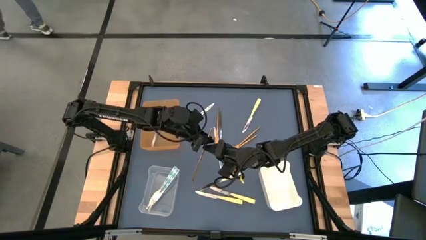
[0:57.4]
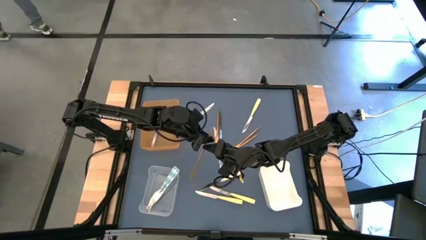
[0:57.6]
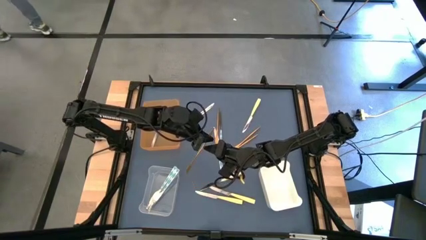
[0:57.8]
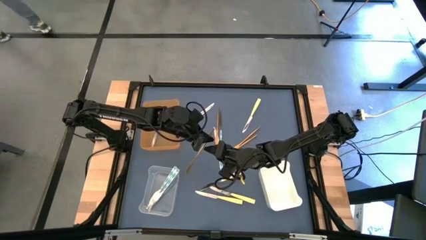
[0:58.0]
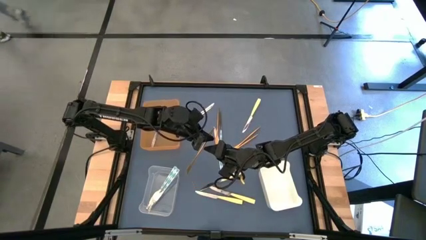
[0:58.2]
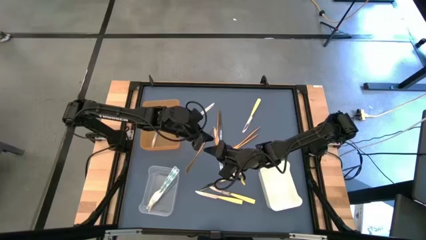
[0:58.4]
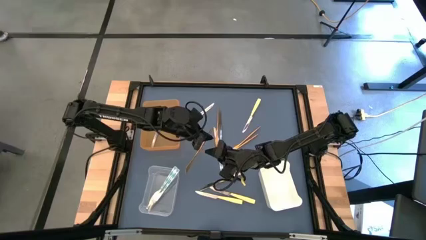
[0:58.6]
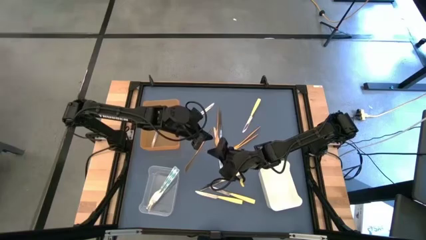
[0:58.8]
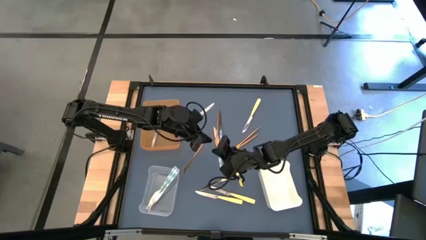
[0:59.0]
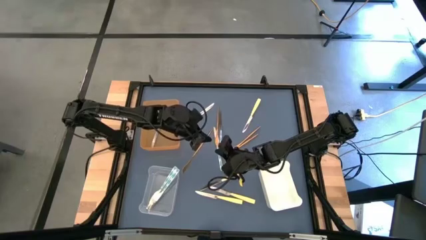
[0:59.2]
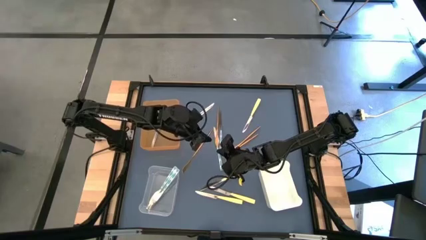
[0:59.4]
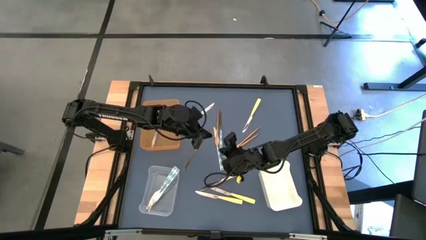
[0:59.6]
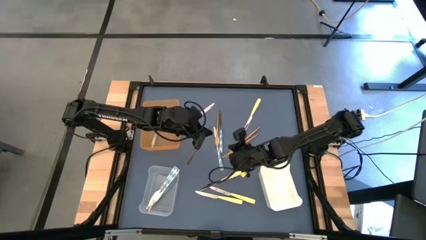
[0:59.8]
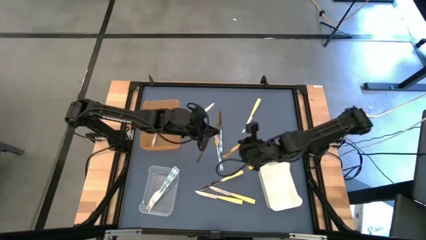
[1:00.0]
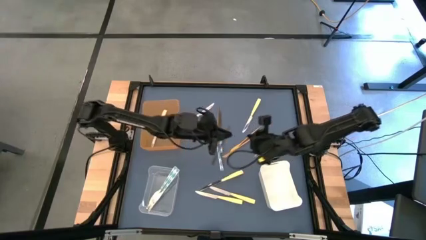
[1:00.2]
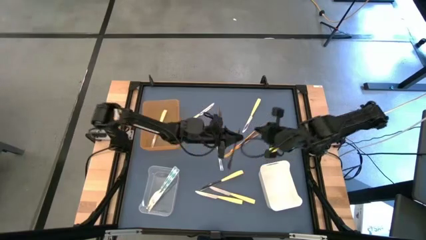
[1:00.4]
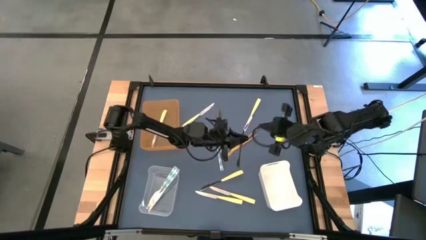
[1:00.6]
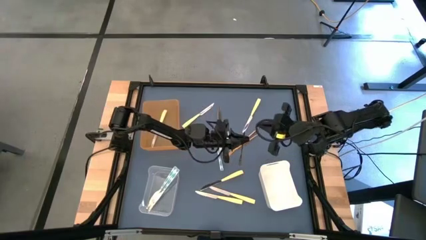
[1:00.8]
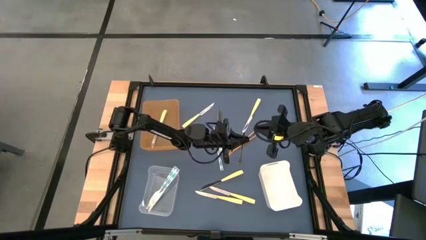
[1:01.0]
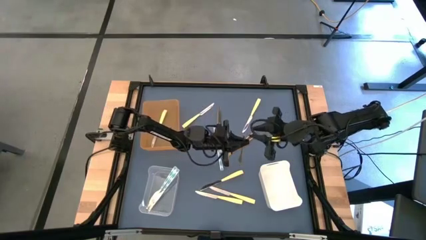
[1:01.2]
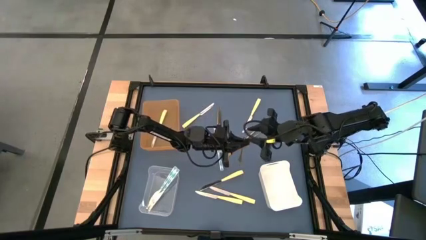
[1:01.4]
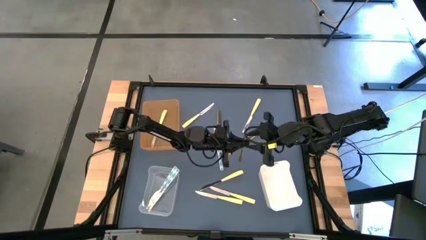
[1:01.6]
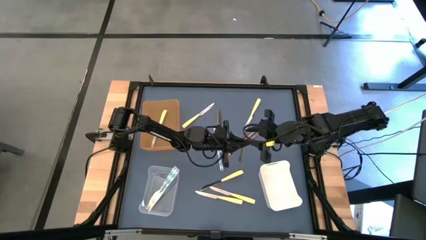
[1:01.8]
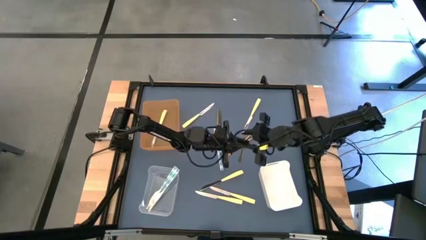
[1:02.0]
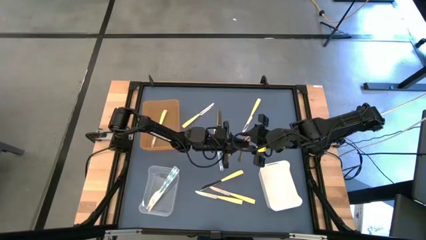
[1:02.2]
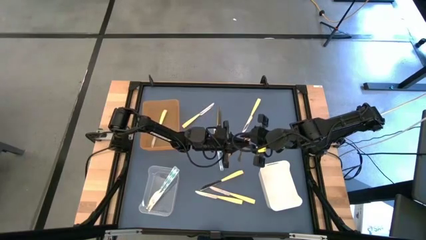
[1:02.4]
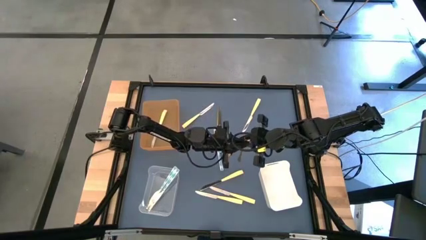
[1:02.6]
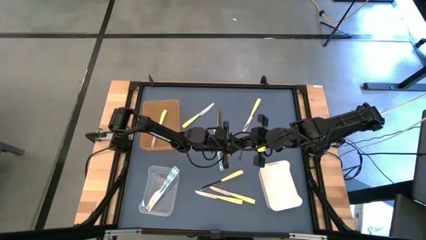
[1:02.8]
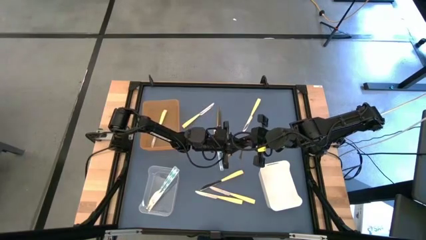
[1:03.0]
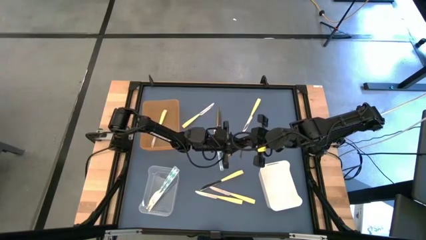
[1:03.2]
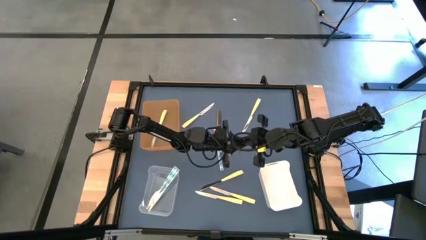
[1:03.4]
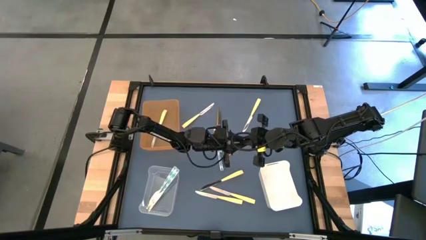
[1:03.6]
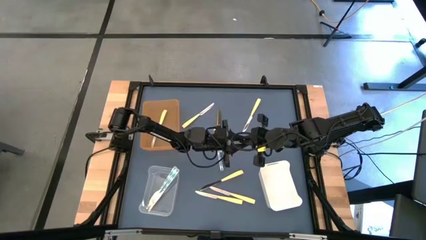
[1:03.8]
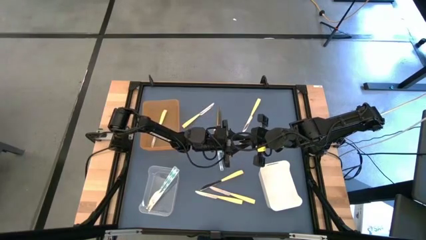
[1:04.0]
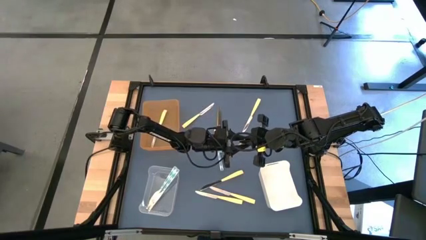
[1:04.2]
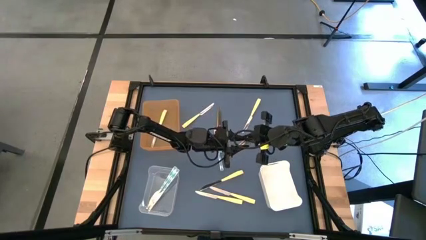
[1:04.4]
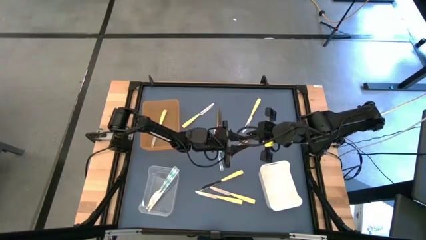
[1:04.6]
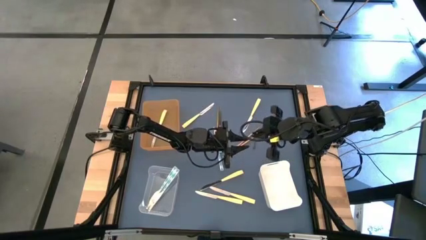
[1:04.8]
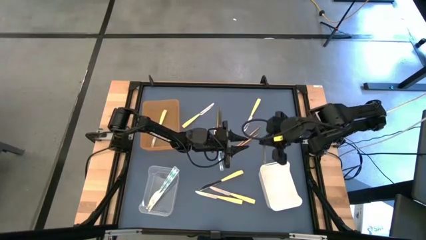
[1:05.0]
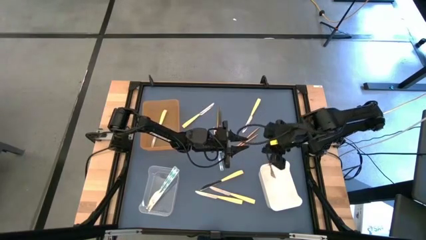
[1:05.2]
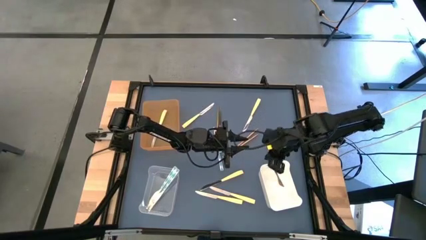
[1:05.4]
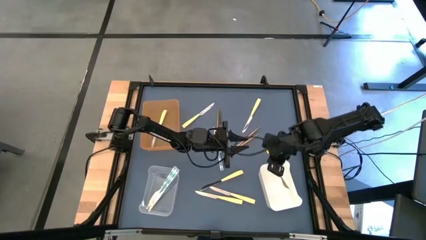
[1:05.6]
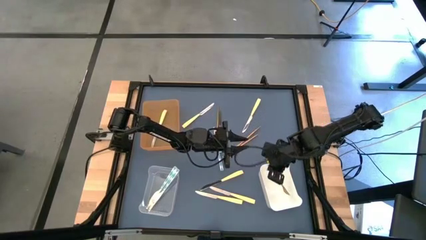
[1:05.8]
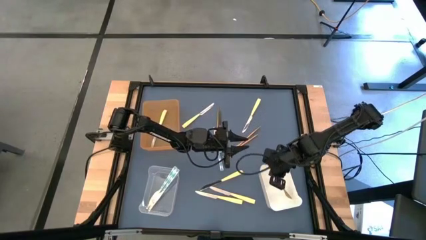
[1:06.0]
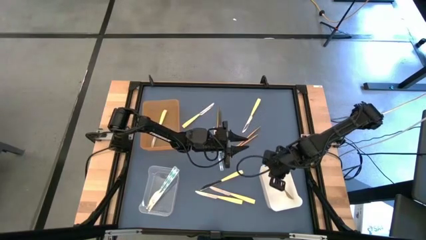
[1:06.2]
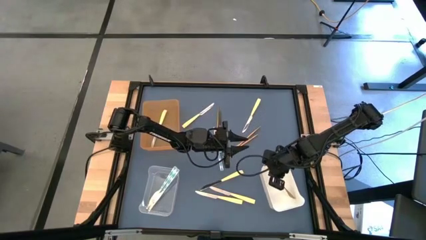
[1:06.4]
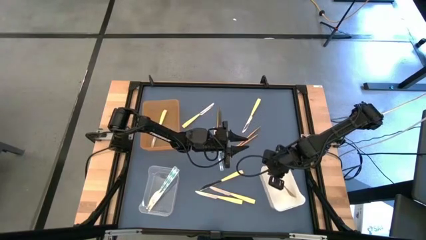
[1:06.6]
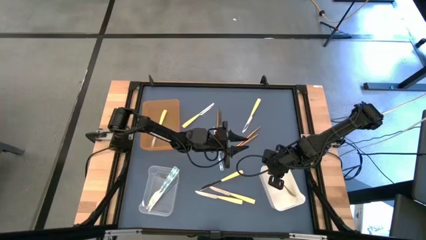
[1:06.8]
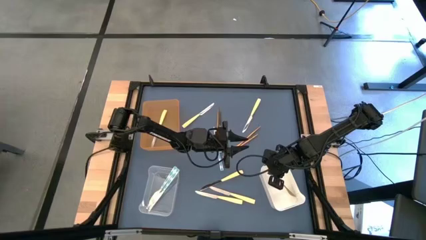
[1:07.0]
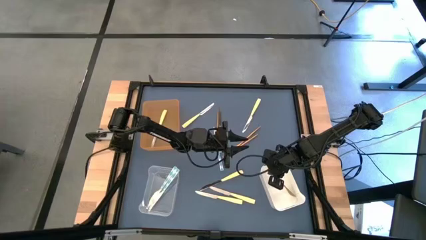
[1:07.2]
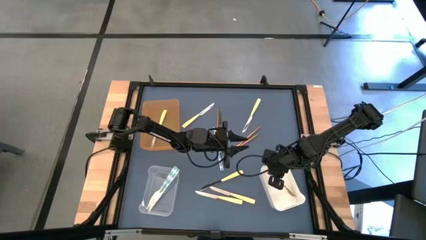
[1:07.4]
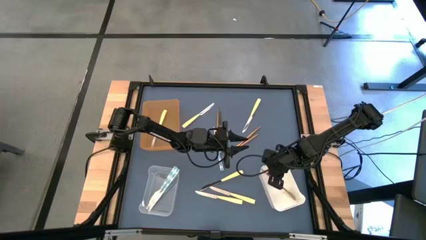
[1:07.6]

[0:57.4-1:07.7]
Task: Sort silverware by color (type)
Put the gold knife into the white bin

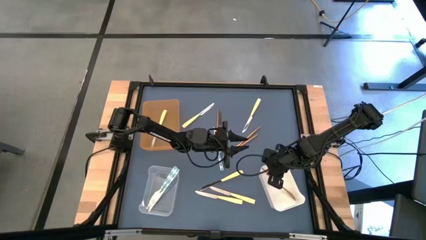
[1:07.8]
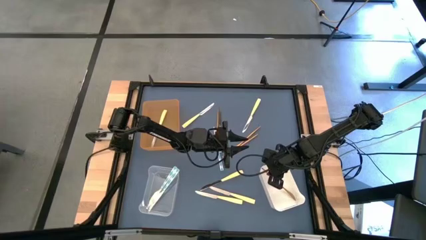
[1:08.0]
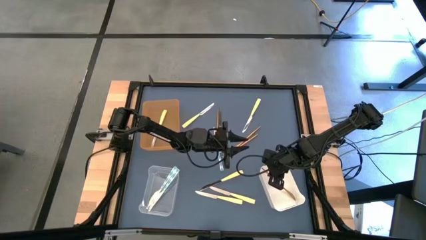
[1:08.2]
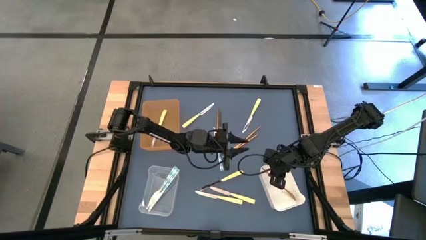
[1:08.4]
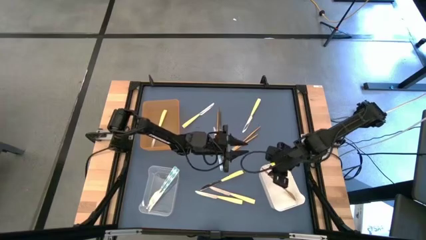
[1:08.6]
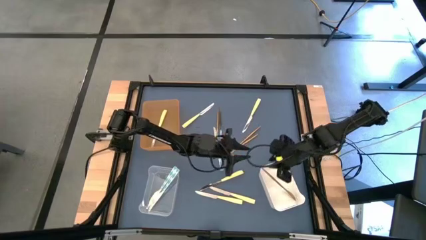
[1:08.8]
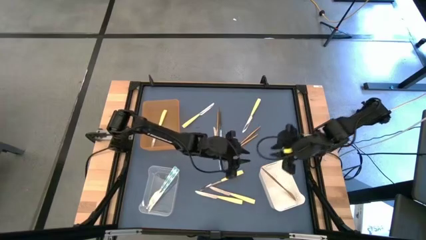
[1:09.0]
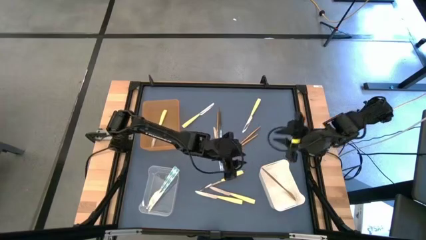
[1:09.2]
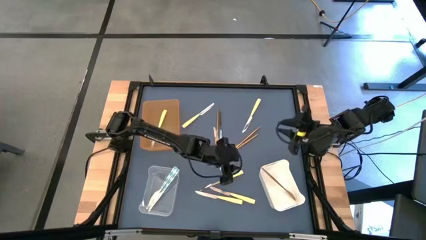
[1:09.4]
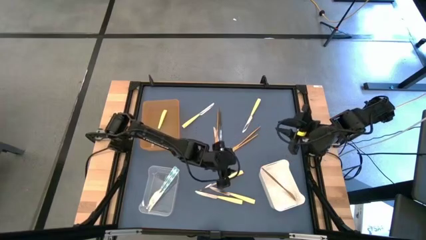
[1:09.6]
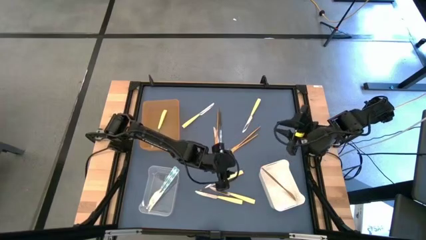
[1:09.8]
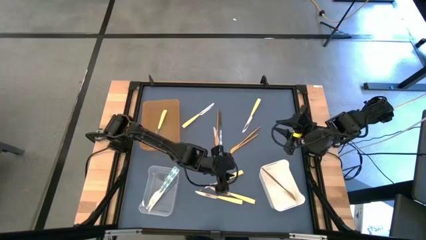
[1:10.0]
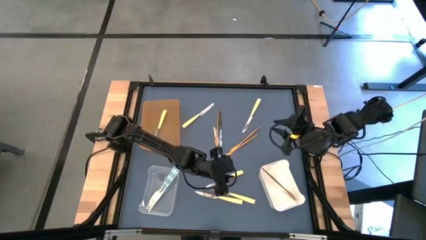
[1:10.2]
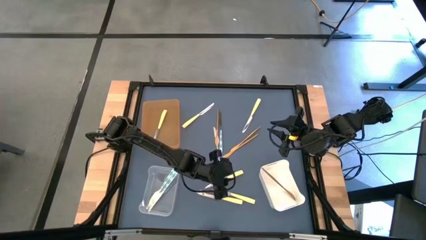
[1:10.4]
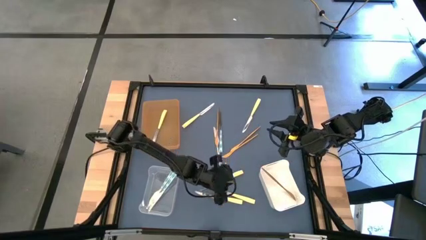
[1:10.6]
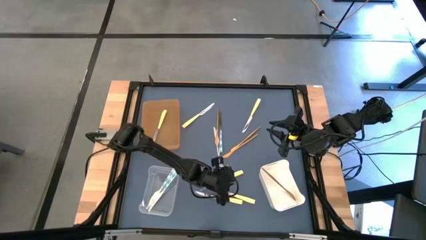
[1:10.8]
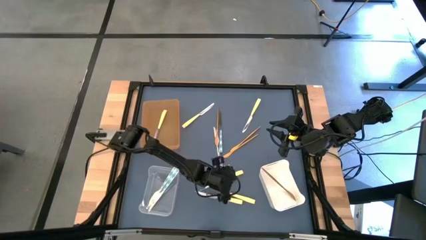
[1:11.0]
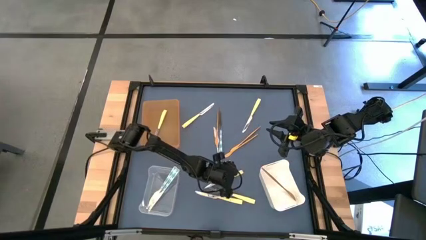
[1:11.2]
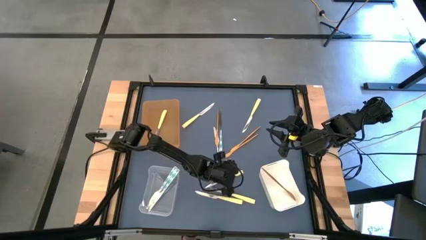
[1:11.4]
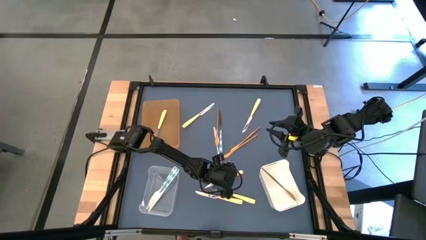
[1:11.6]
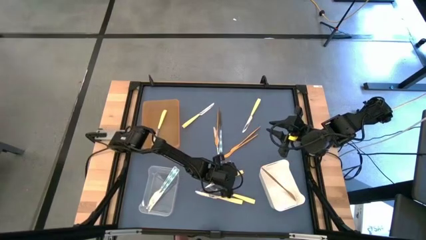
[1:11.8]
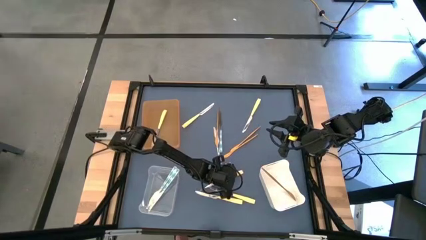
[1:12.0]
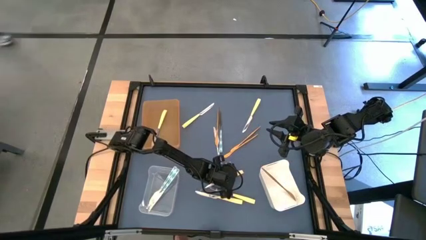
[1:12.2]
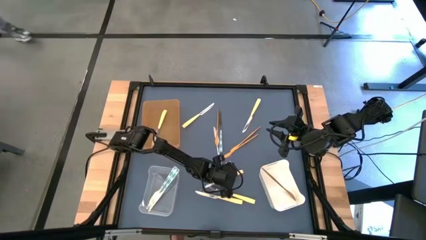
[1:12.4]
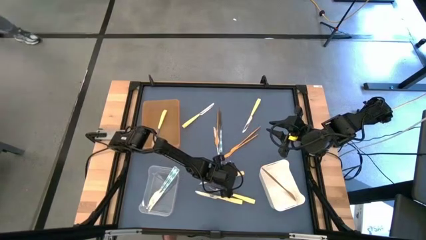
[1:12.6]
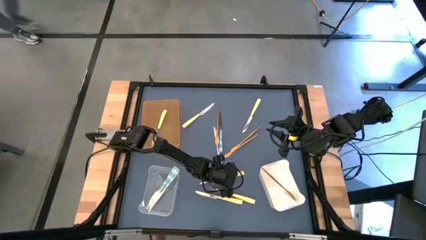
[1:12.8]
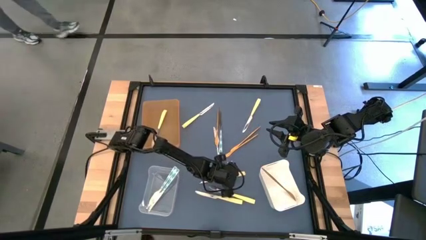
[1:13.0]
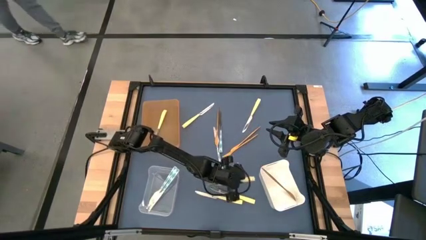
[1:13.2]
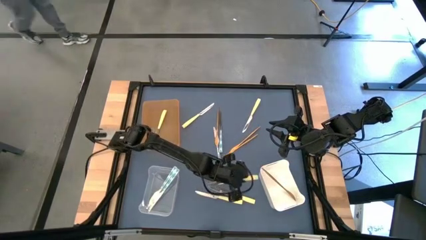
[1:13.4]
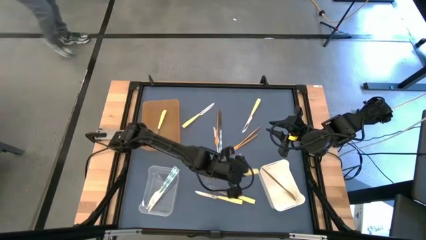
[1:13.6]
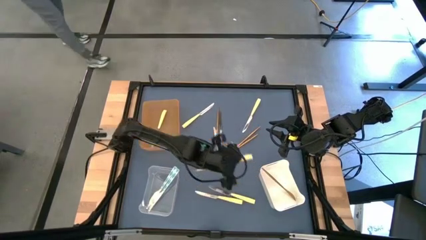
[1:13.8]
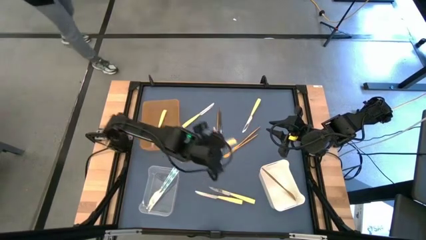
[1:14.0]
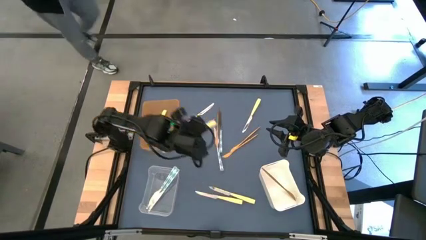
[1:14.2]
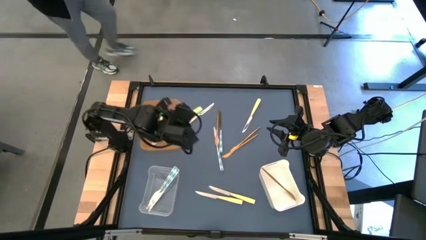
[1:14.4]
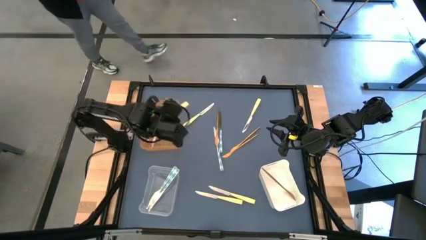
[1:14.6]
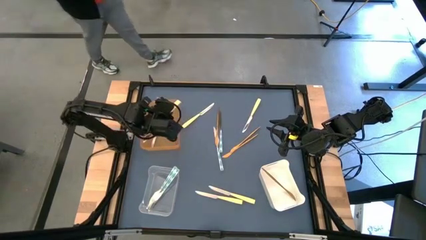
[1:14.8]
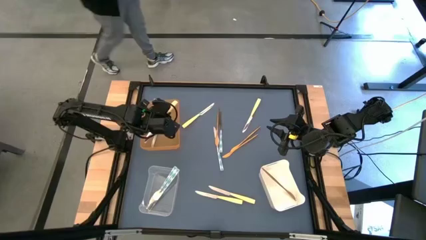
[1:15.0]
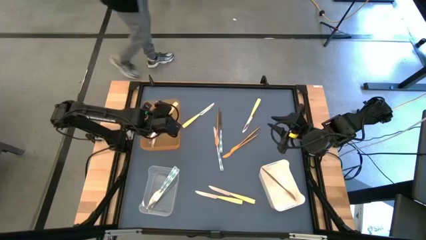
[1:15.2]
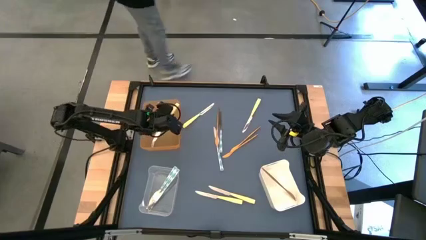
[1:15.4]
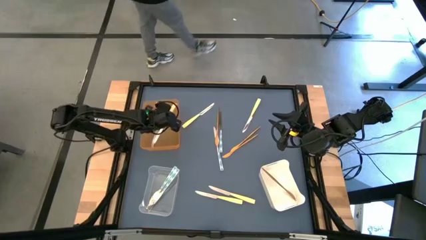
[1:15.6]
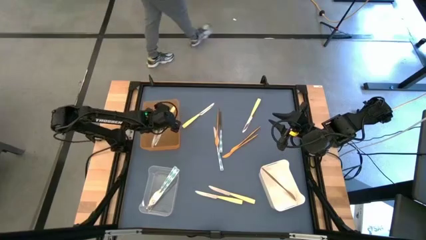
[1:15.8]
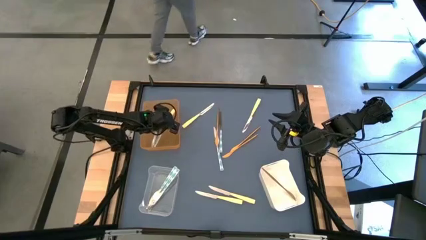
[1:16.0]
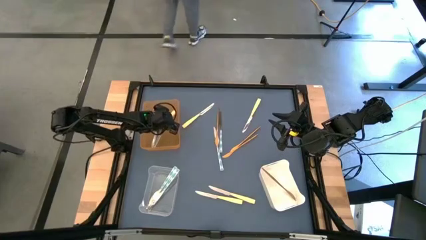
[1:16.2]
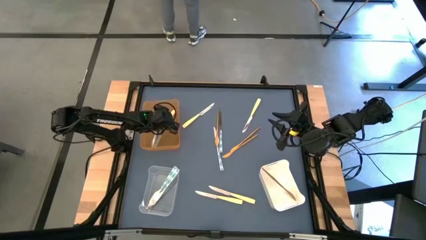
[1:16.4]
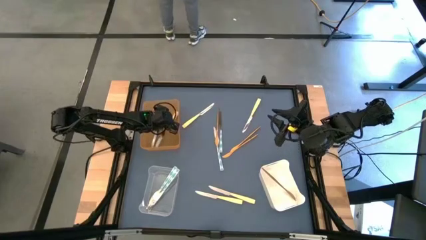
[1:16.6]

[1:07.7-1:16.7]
Put the yellow knife into the orange bin
